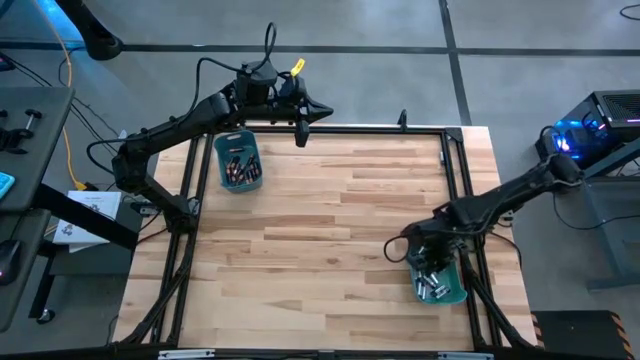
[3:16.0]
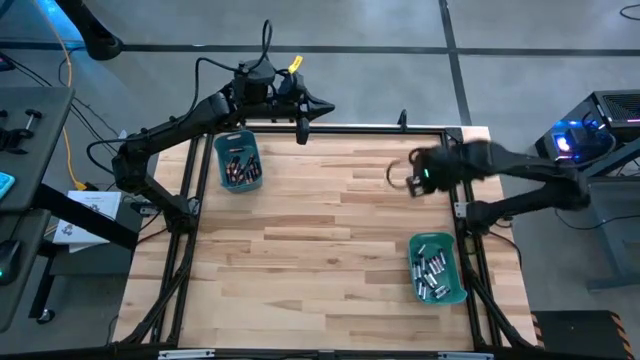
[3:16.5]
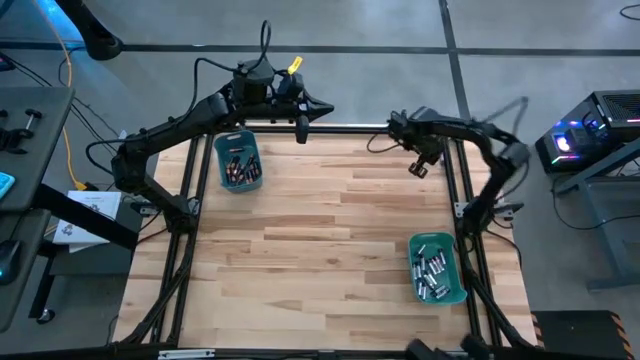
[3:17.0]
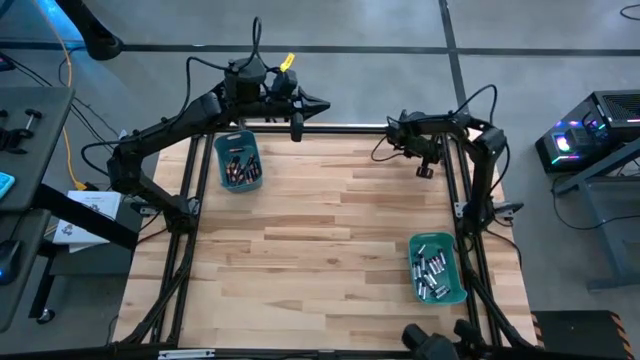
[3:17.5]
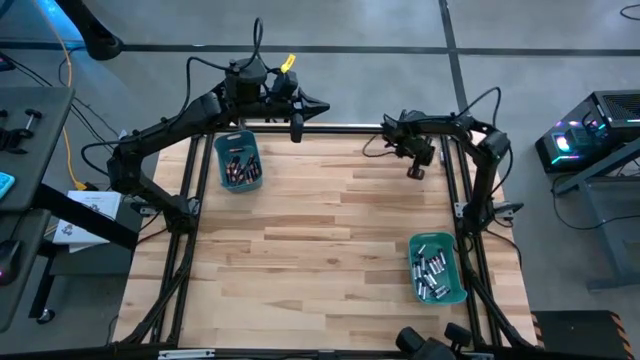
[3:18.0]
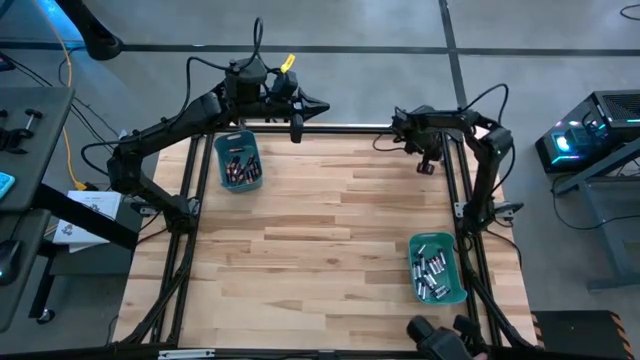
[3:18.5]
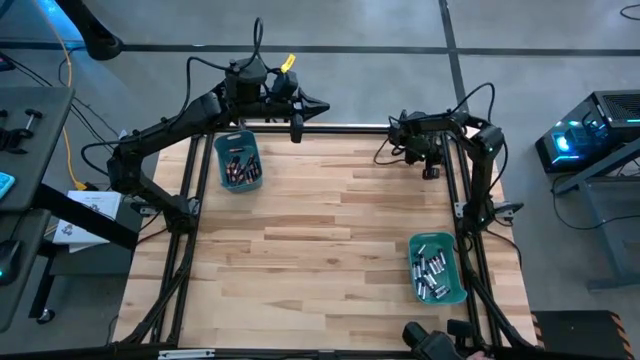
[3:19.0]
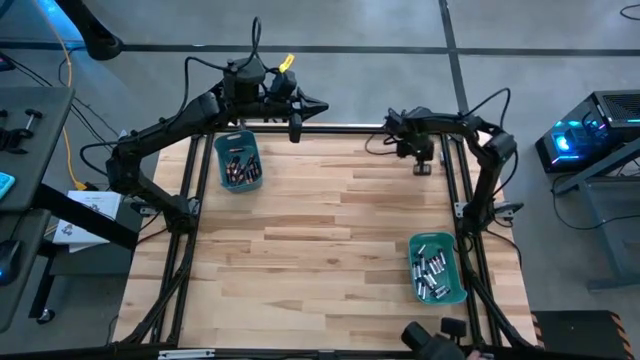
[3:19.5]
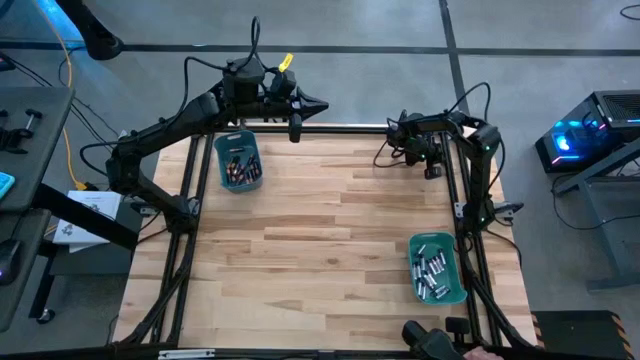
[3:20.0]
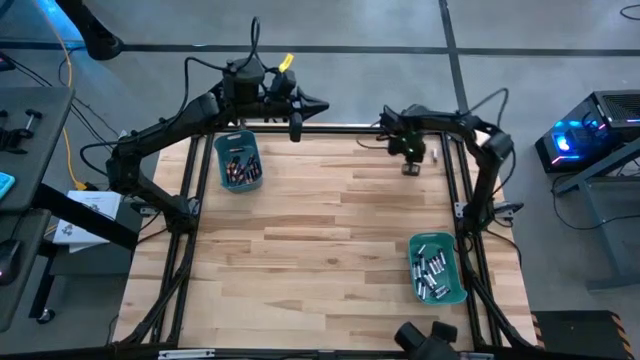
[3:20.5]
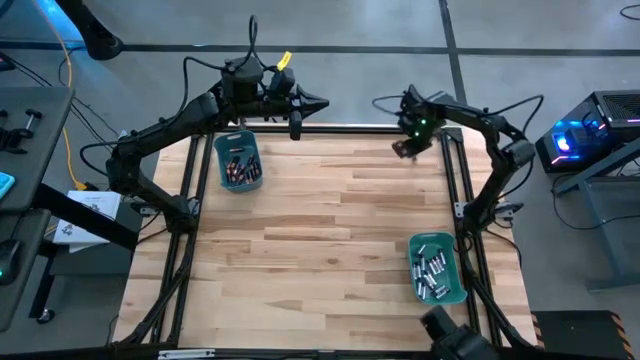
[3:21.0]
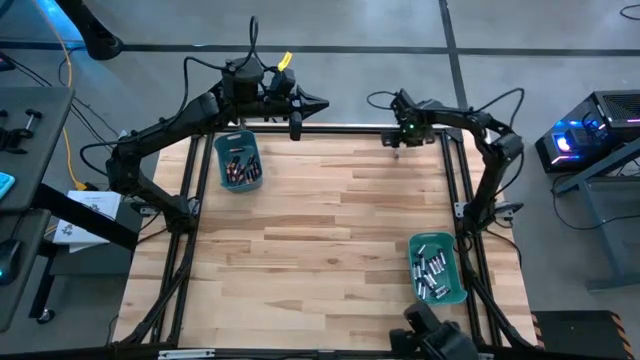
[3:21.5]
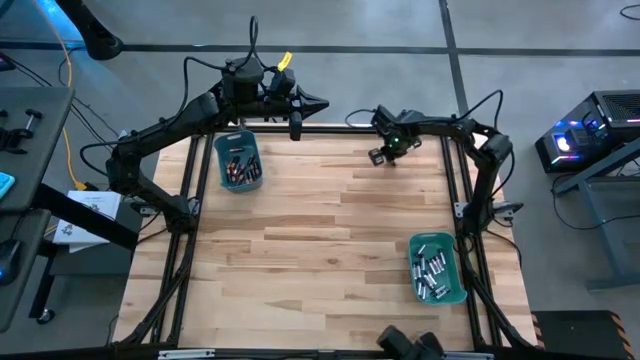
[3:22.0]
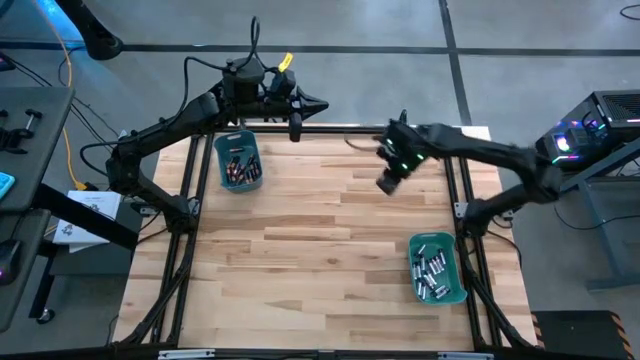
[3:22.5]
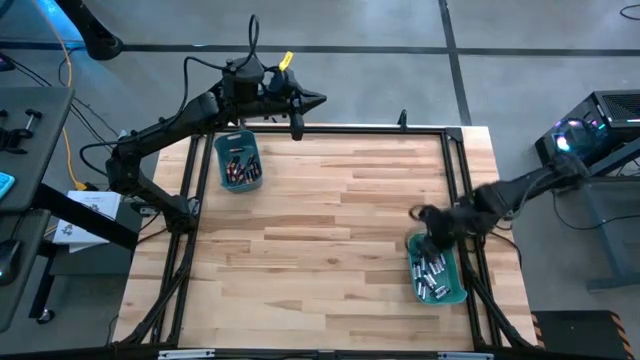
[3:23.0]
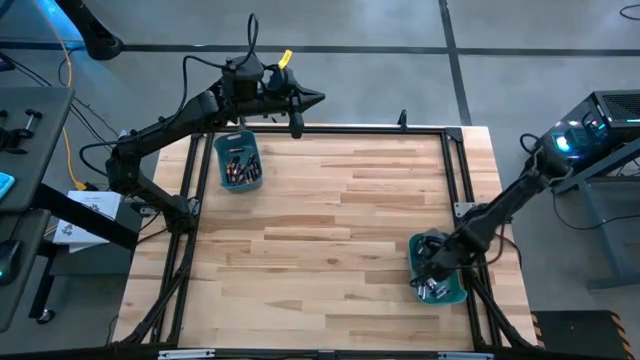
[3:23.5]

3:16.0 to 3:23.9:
Task: Sort batteries
Put the silver battery into the green bin

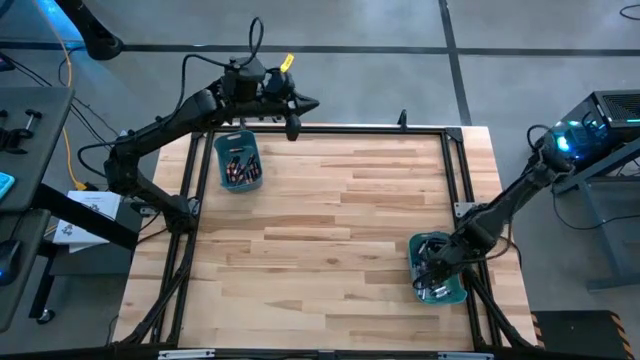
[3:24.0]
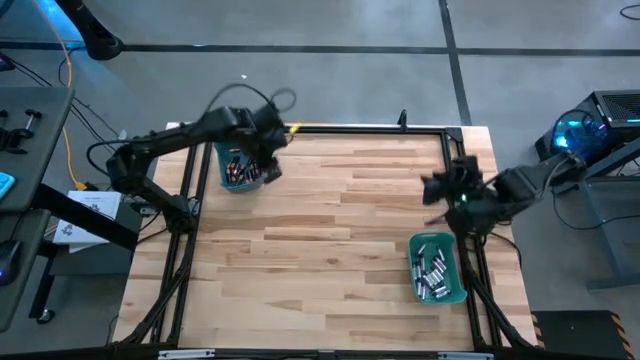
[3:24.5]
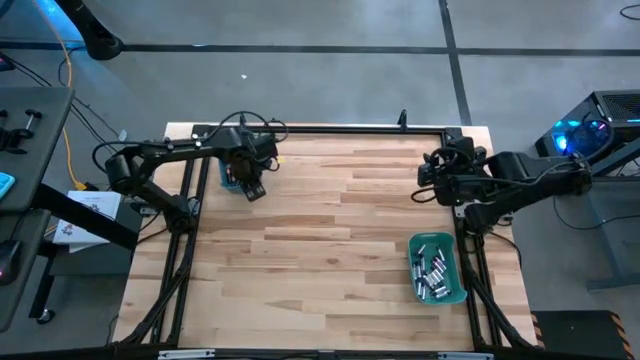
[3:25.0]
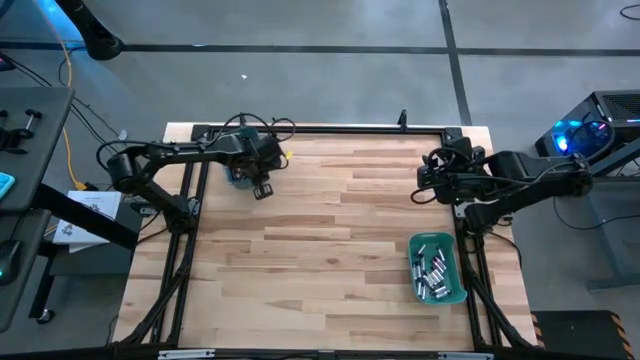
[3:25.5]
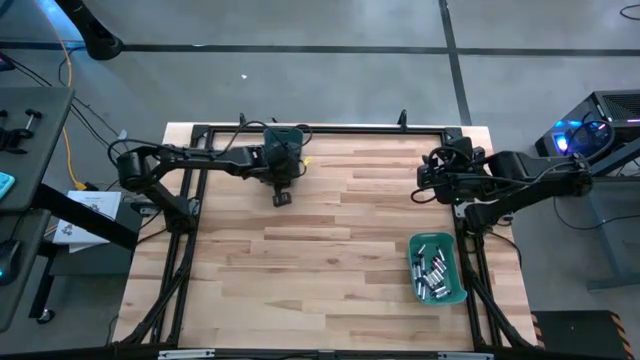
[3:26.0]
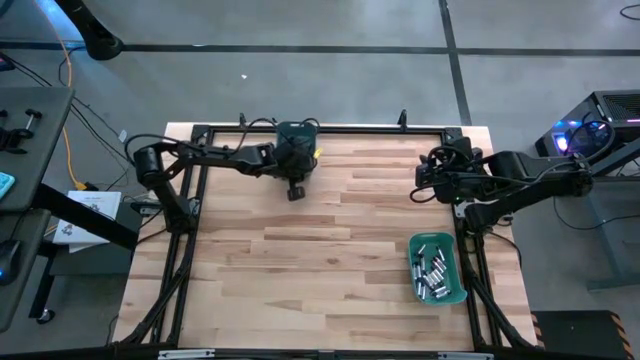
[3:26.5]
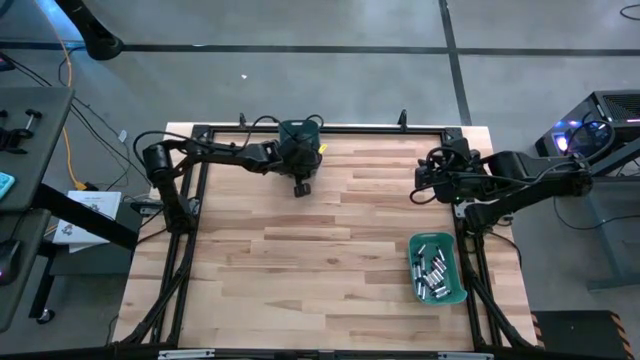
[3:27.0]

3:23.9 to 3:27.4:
Move the blue bin to the top center of the table

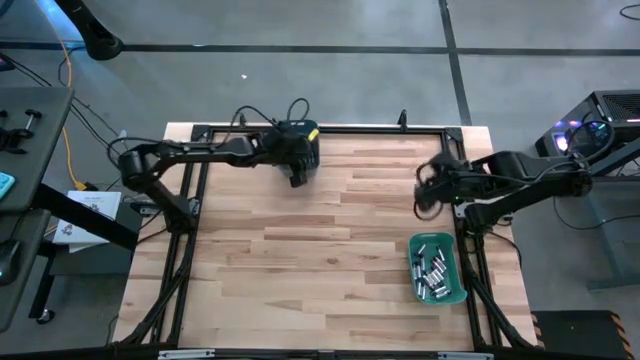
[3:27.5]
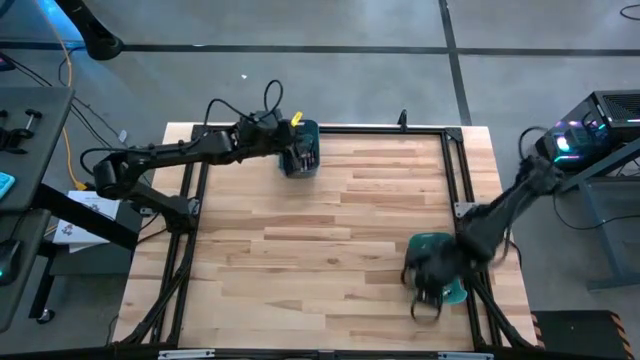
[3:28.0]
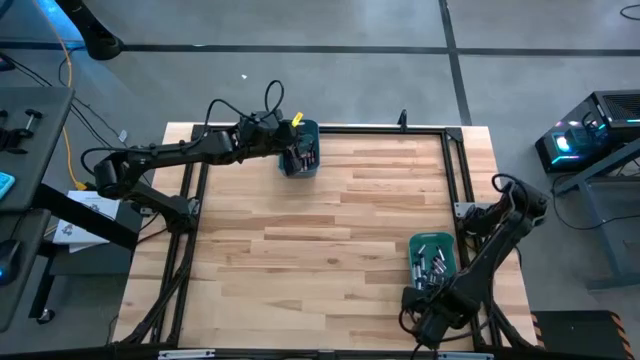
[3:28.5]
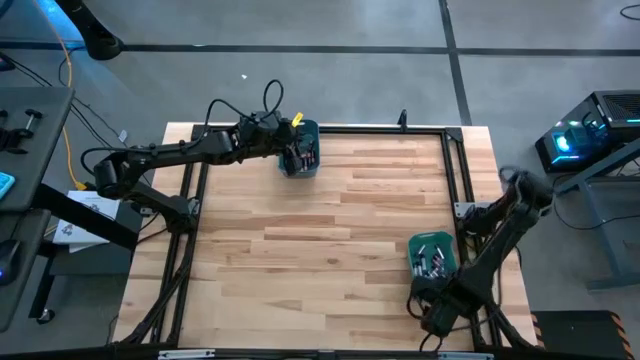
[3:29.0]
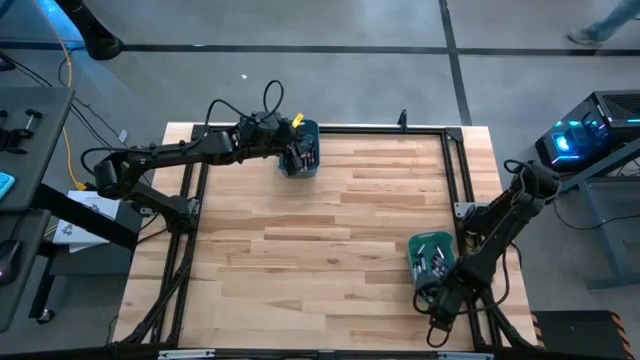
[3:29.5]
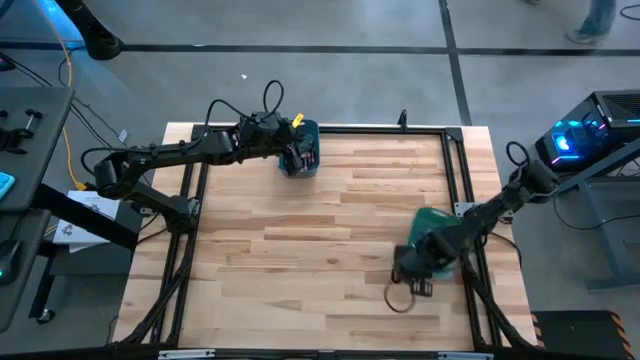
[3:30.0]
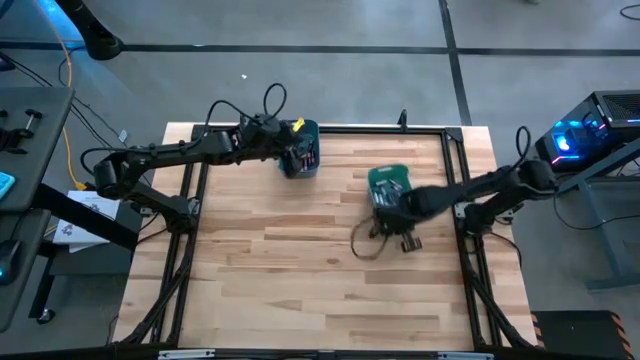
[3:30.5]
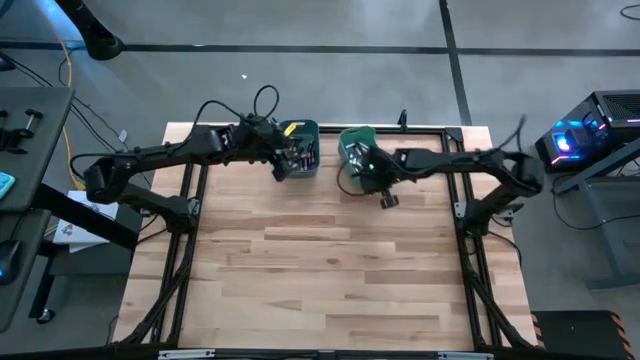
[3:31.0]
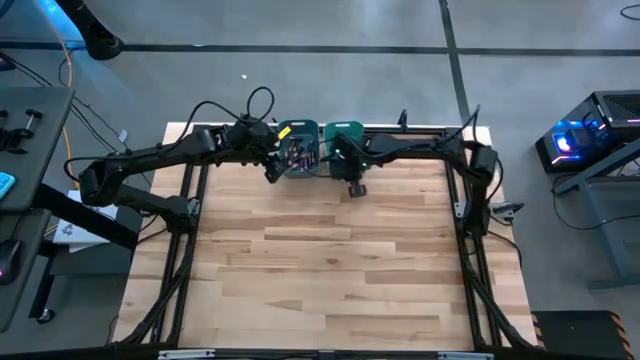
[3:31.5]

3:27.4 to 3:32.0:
Move the green bin to the top center of the table

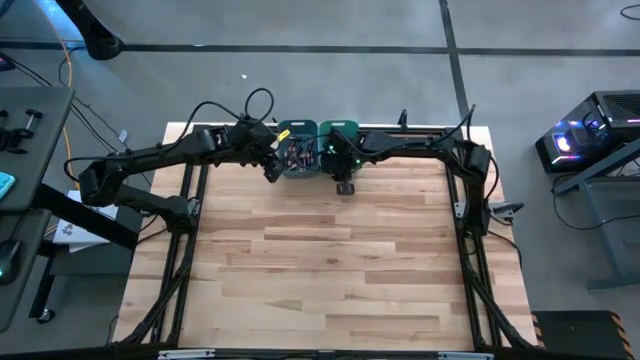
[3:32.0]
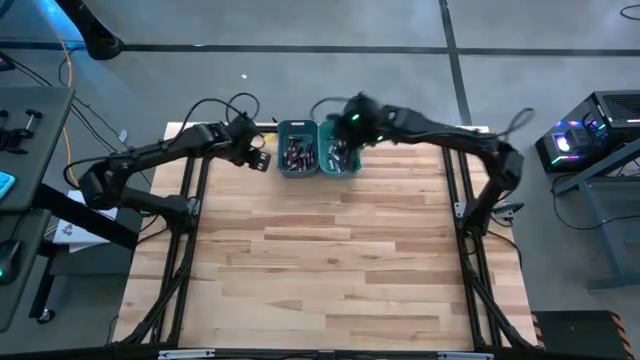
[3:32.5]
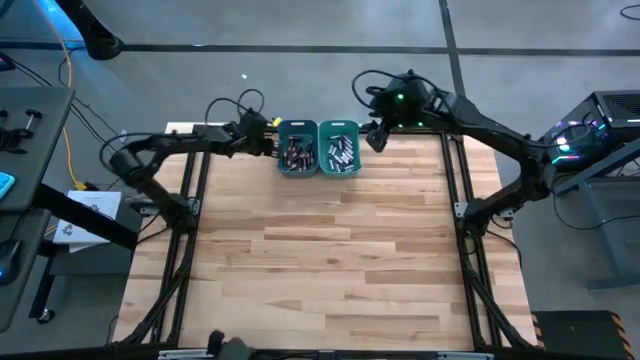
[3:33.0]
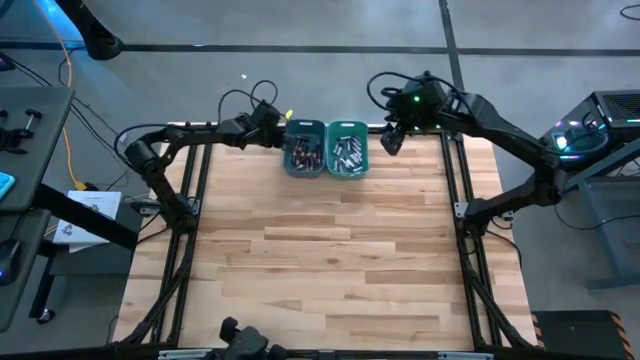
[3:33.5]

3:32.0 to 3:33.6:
Adjust the blue bin

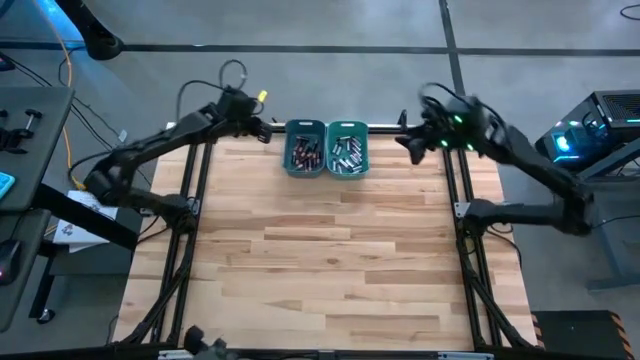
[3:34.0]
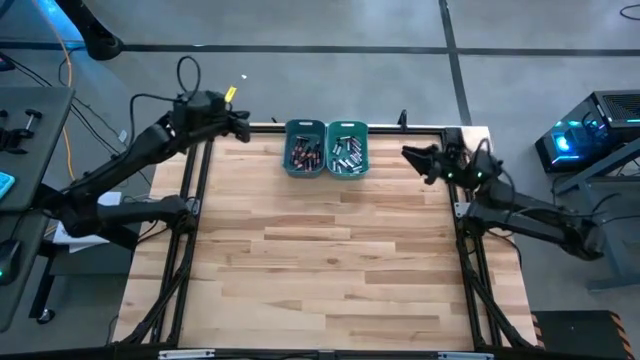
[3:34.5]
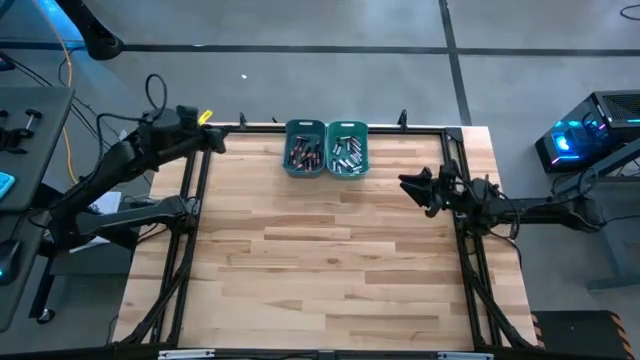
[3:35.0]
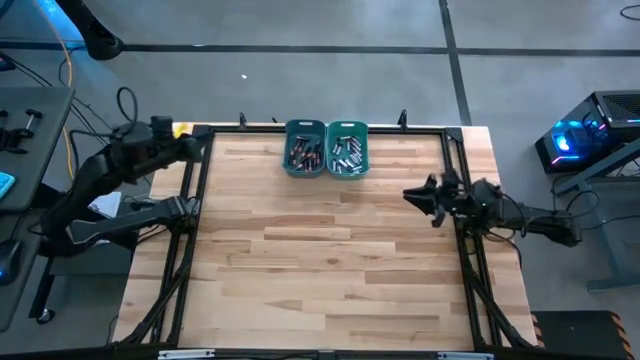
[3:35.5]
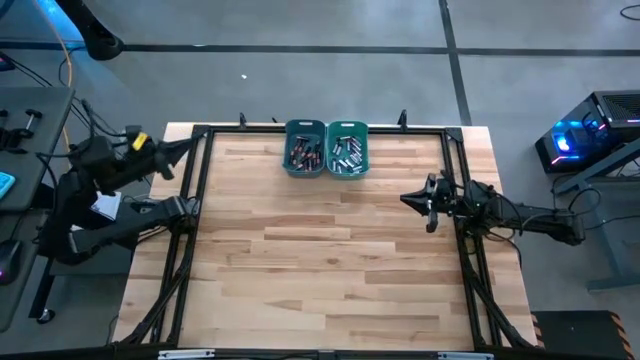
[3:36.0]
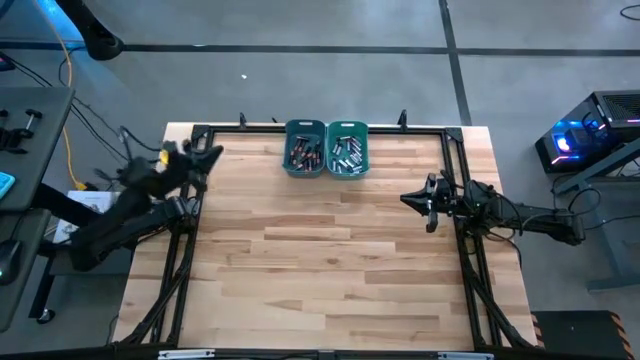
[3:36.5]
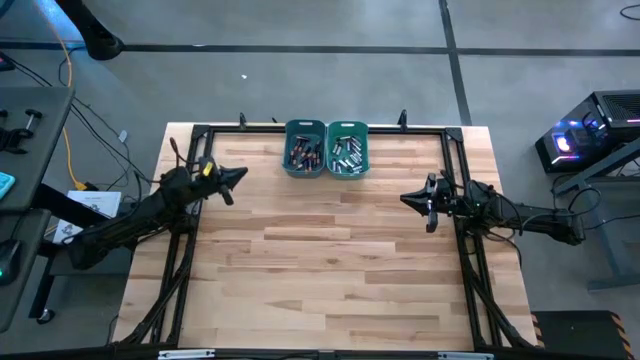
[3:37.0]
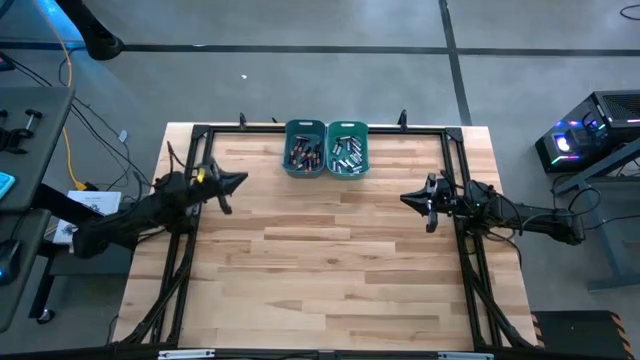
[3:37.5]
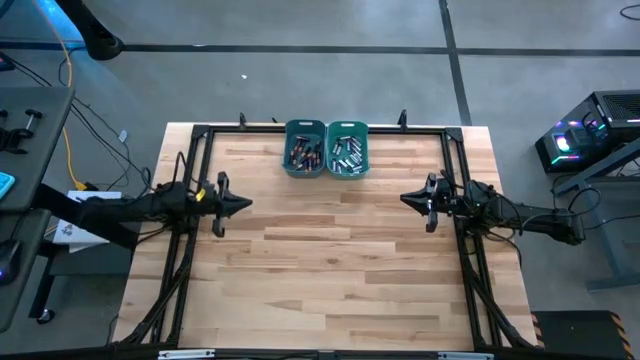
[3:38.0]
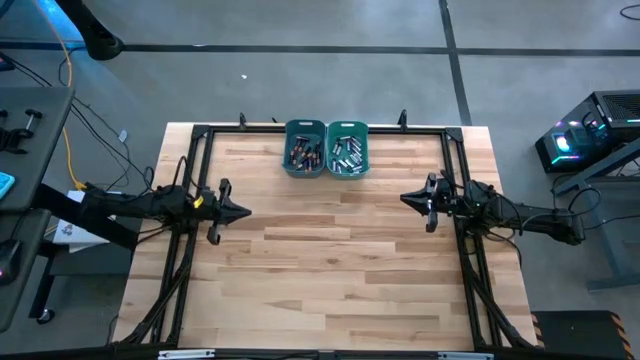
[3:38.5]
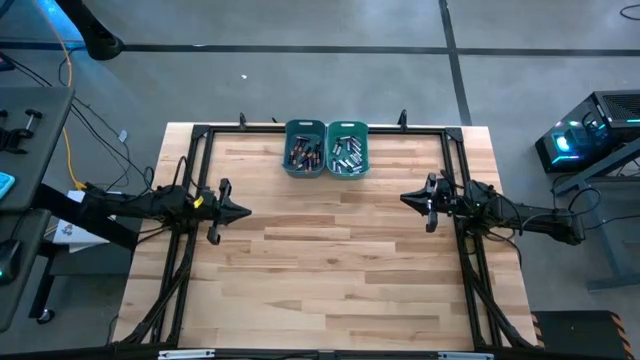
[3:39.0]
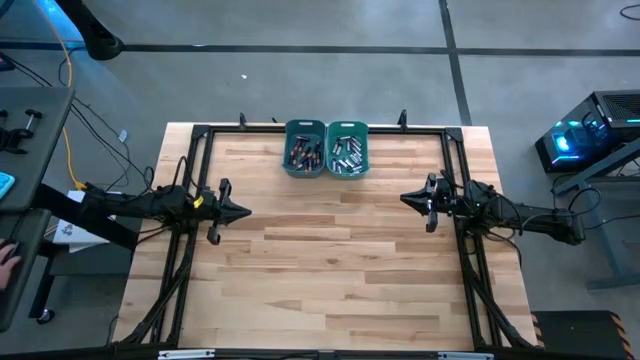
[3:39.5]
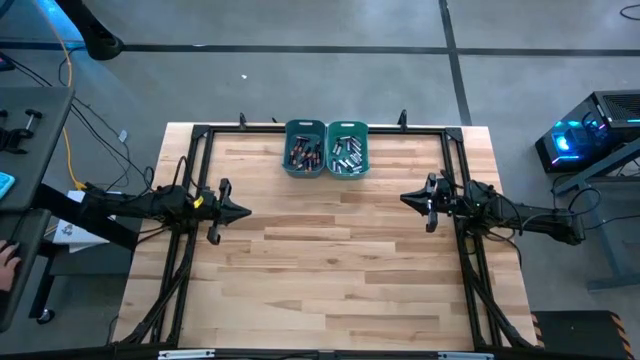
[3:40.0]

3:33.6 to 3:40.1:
Return to Home Position
